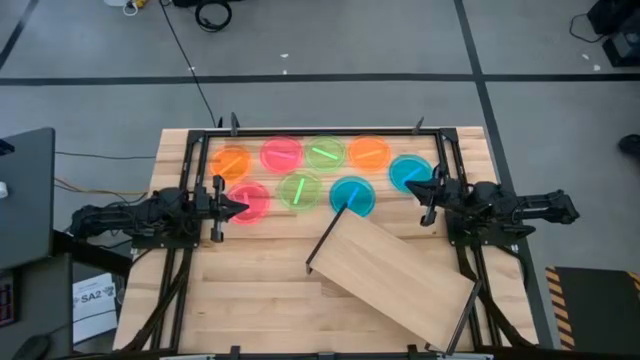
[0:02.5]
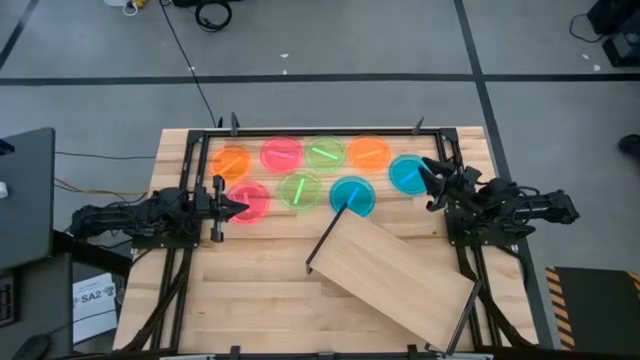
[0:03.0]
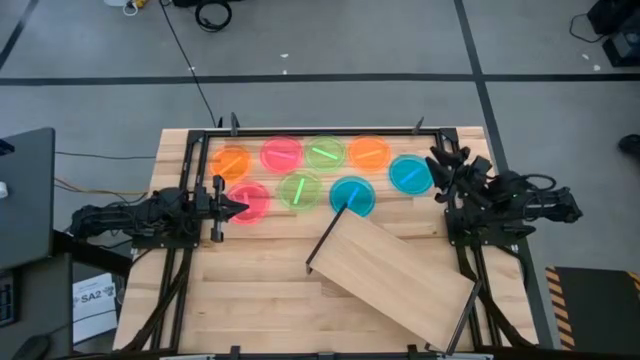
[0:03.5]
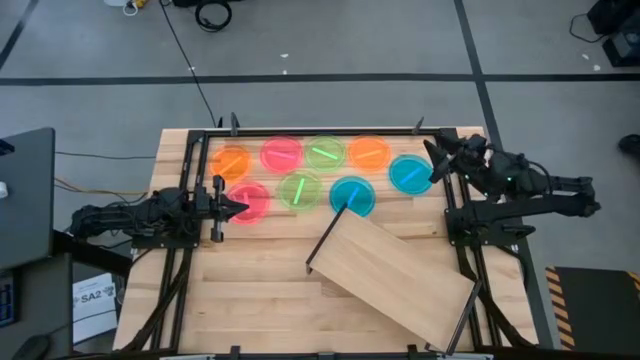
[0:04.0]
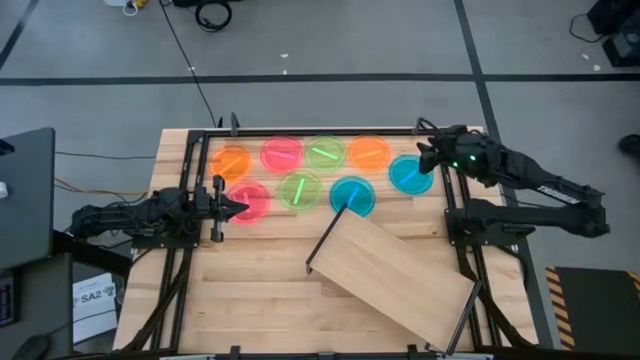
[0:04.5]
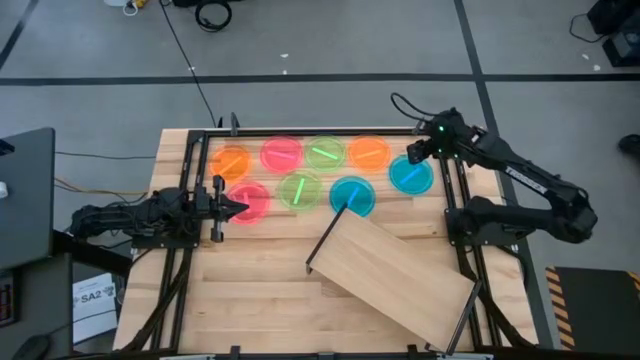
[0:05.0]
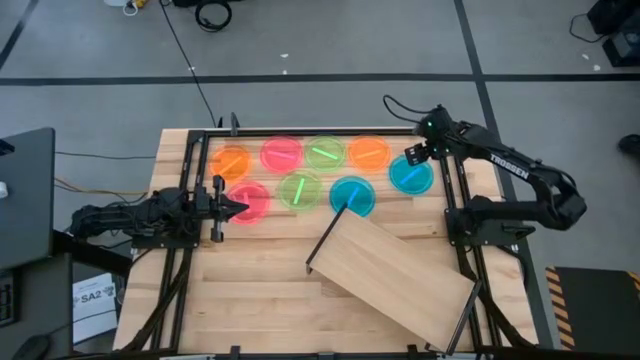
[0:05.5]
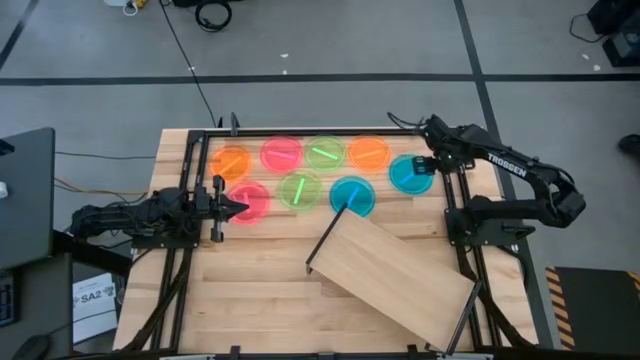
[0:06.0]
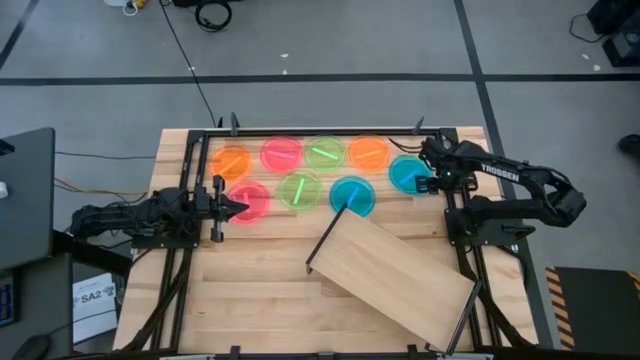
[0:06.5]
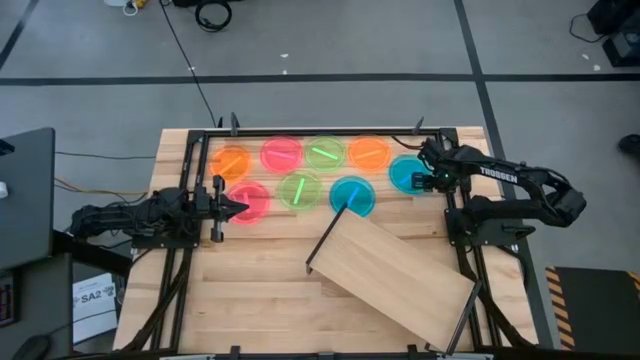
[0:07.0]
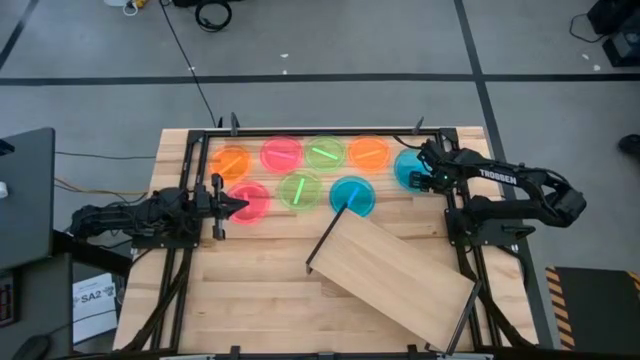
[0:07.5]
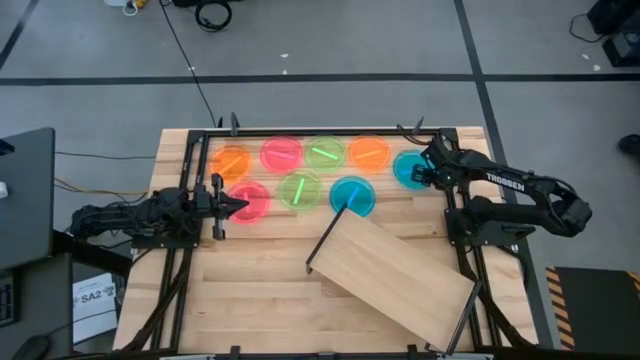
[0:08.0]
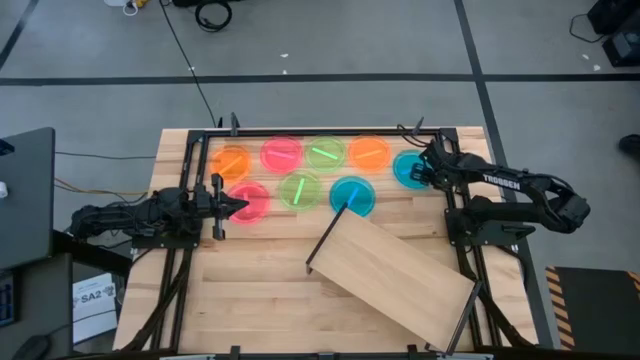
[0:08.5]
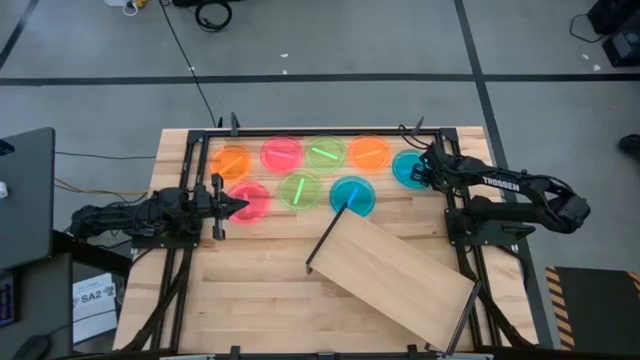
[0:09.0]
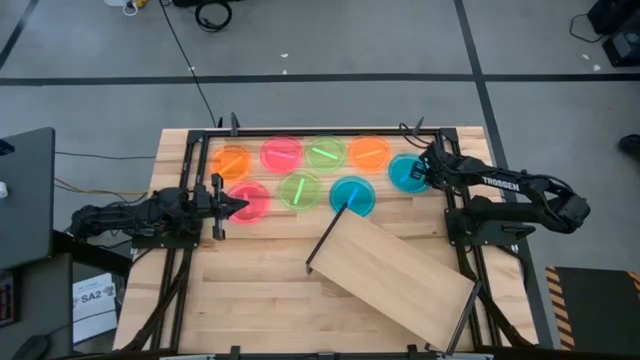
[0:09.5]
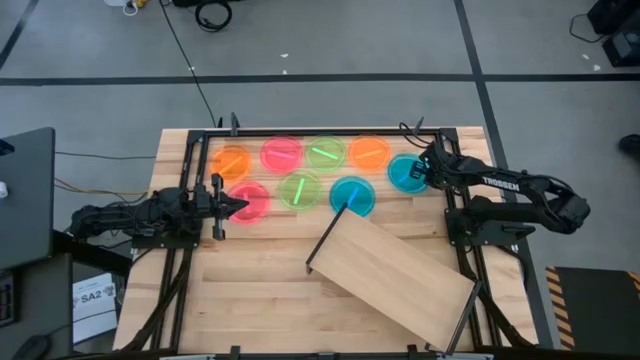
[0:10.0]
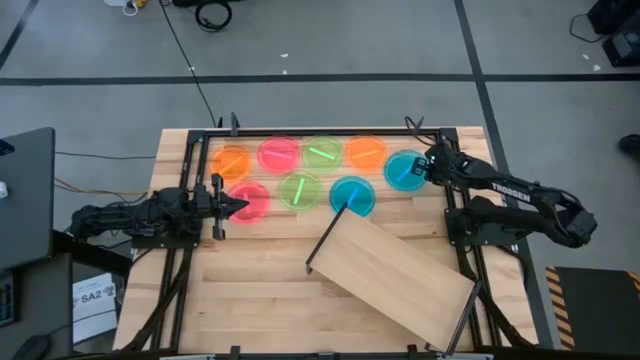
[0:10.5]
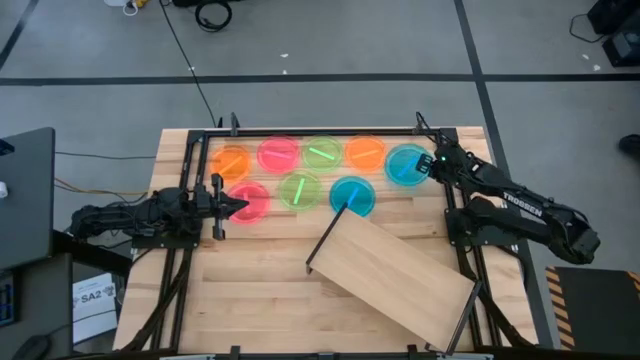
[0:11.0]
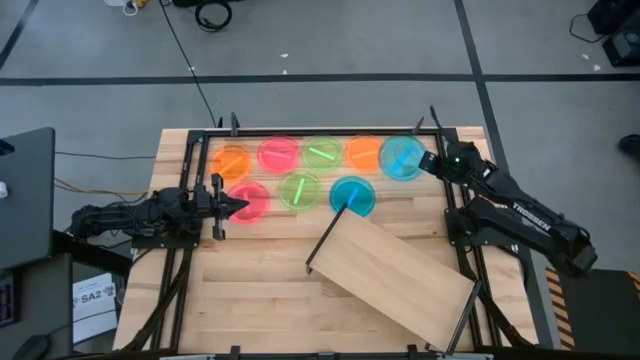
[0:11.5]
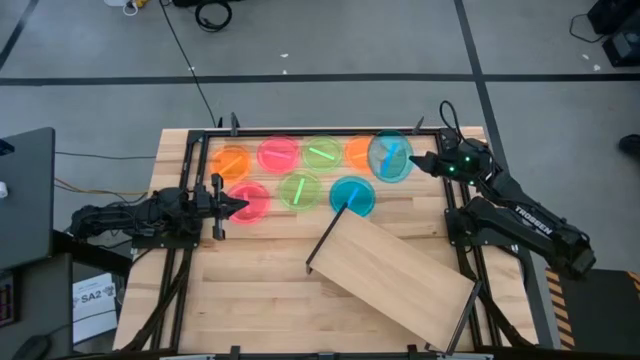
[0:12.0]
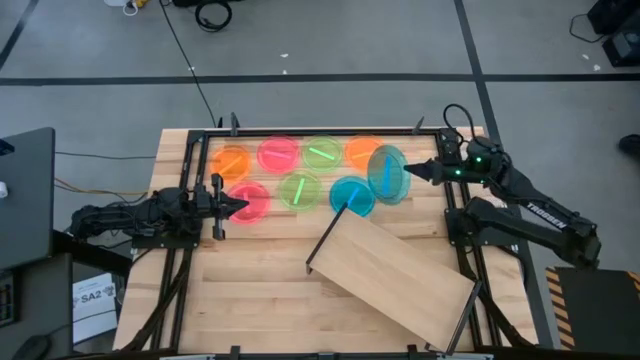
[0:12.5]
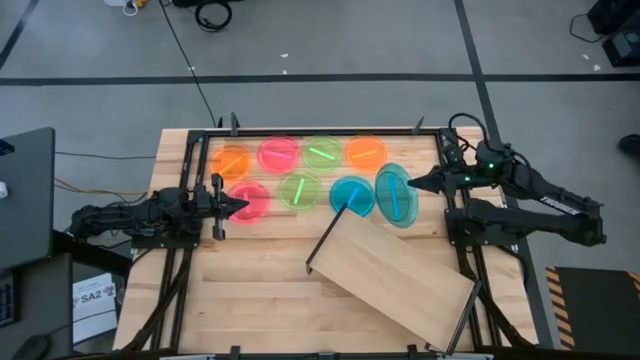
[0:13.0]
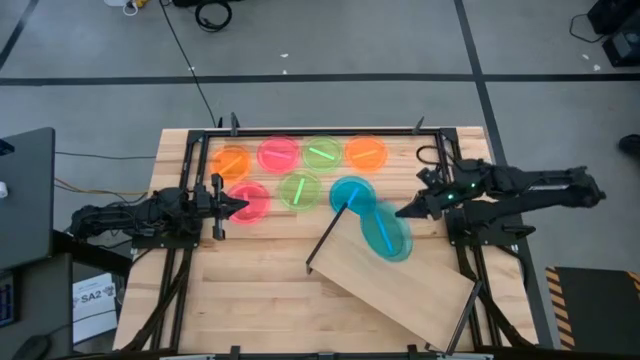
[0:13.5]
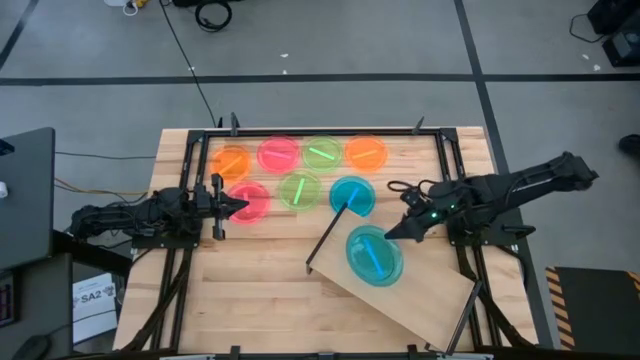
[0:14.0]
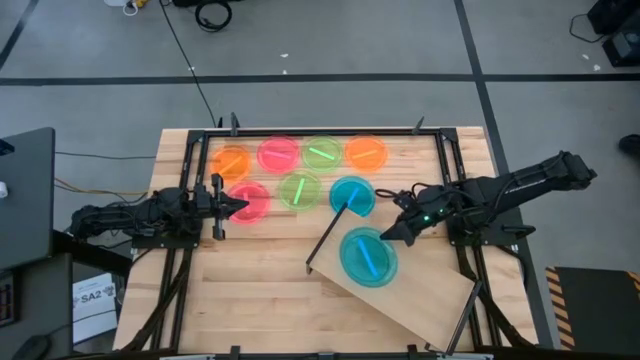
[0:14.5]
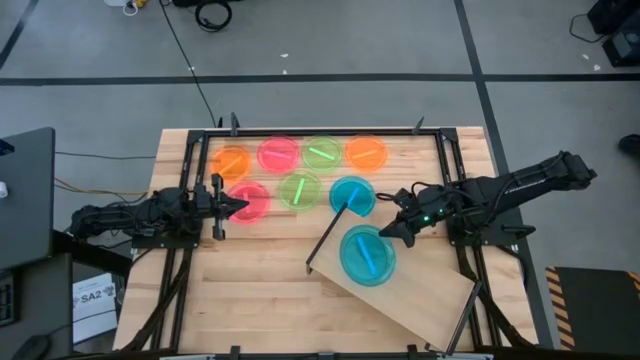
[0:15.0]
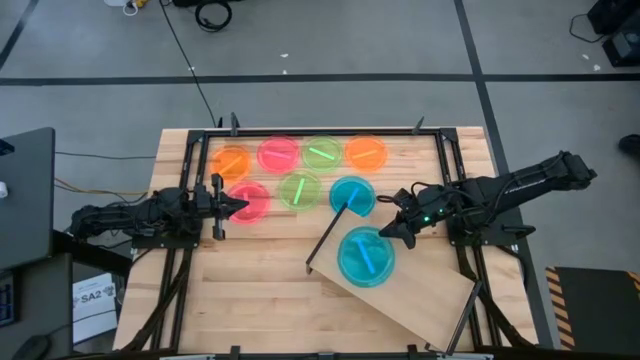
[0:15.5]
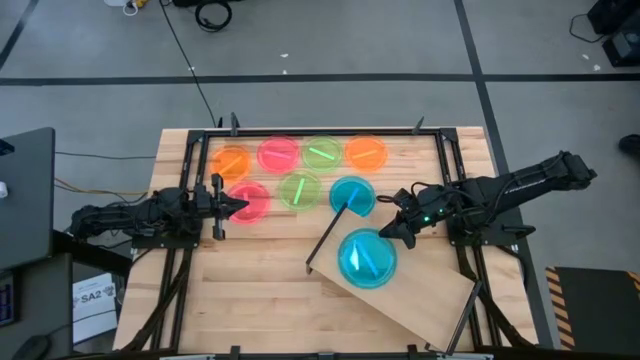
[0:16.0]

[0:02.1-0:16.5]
Task: Place and stack plates onto a shelf
Put the top right transparent blue plate on the shelf

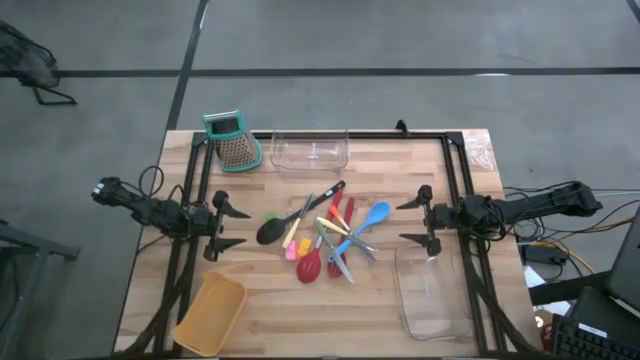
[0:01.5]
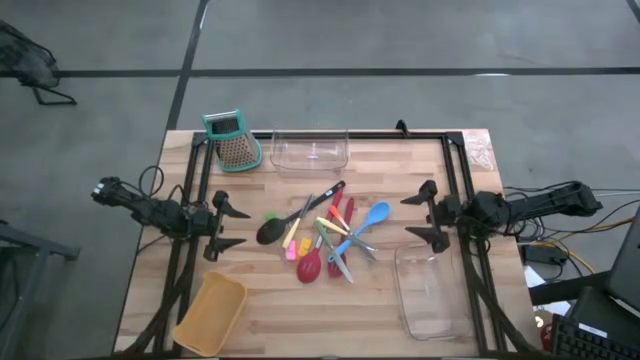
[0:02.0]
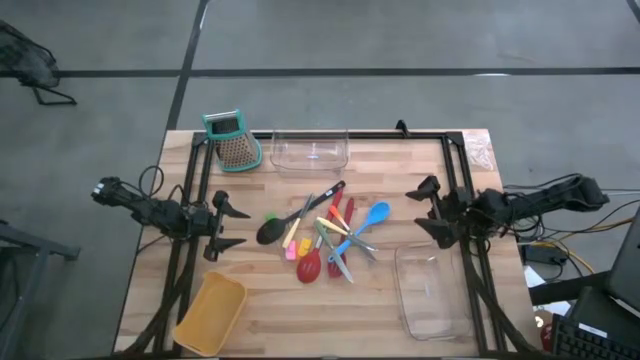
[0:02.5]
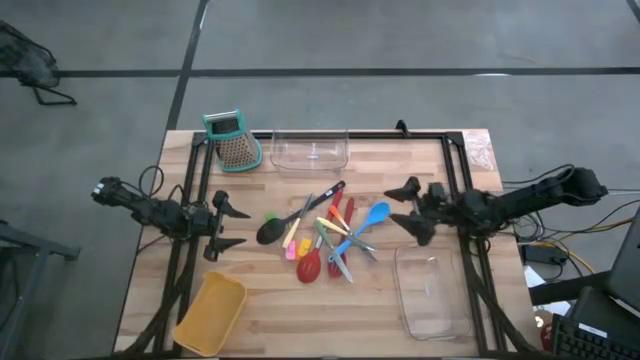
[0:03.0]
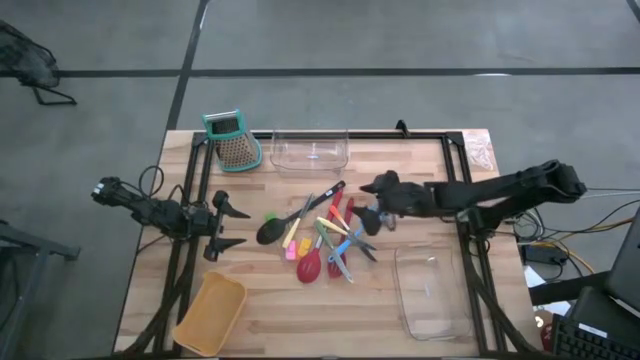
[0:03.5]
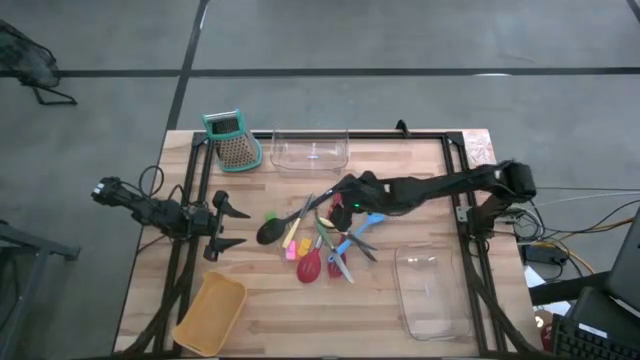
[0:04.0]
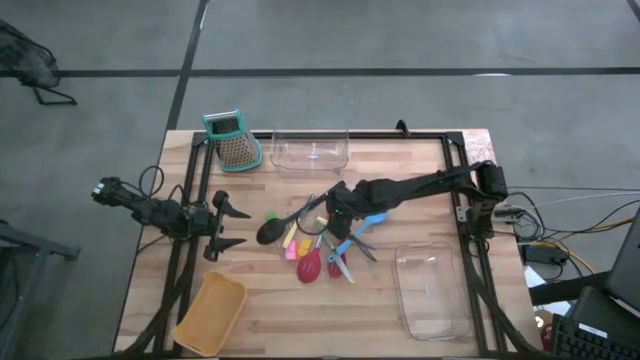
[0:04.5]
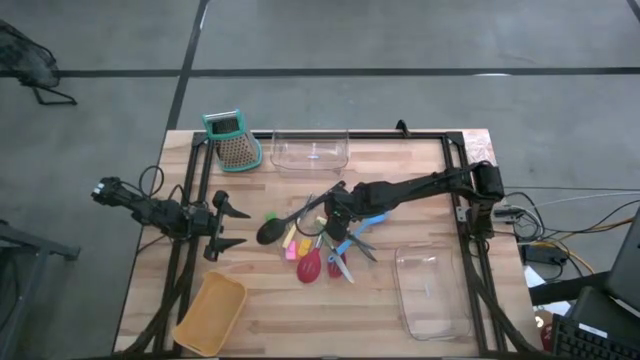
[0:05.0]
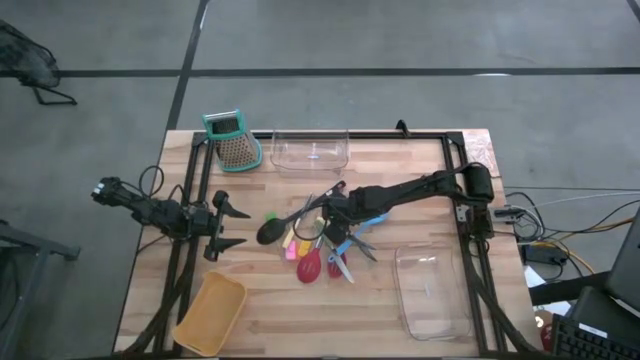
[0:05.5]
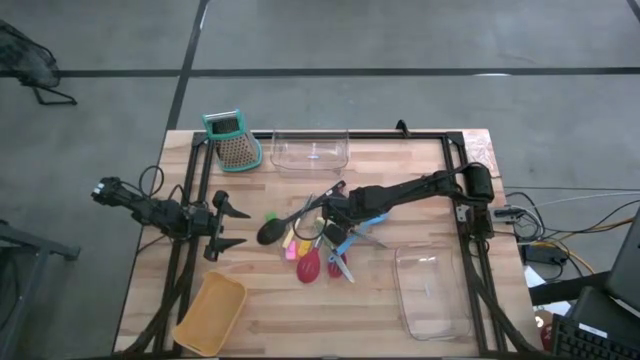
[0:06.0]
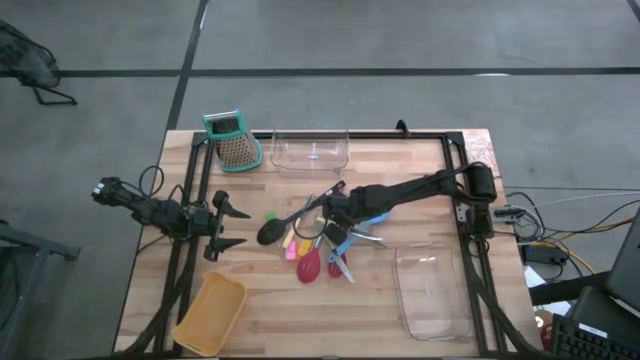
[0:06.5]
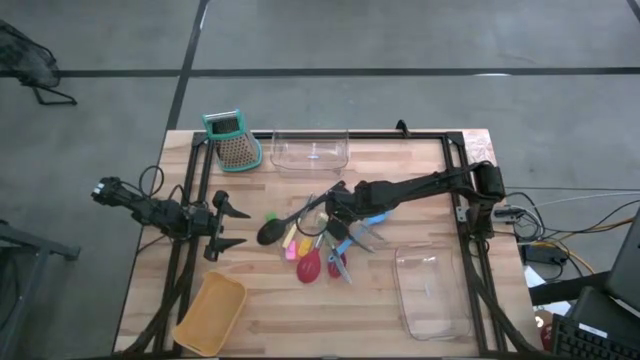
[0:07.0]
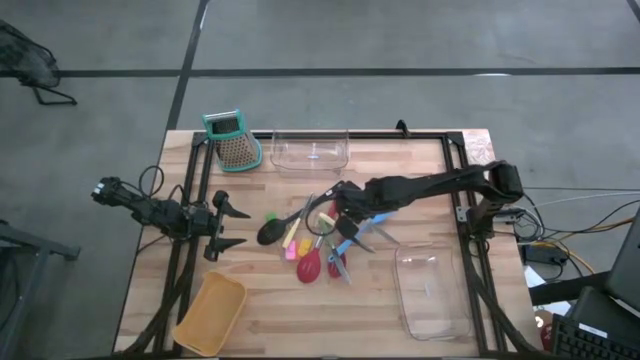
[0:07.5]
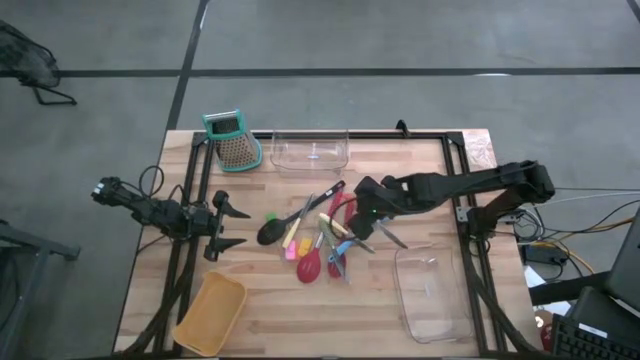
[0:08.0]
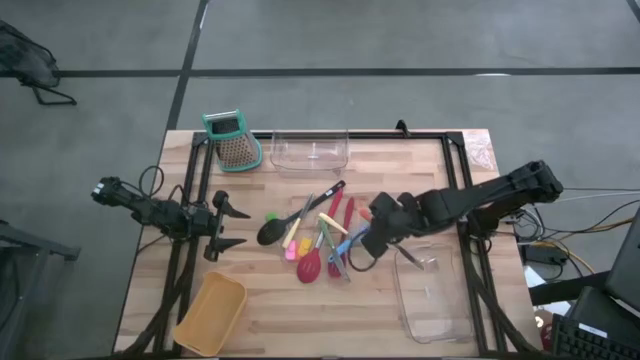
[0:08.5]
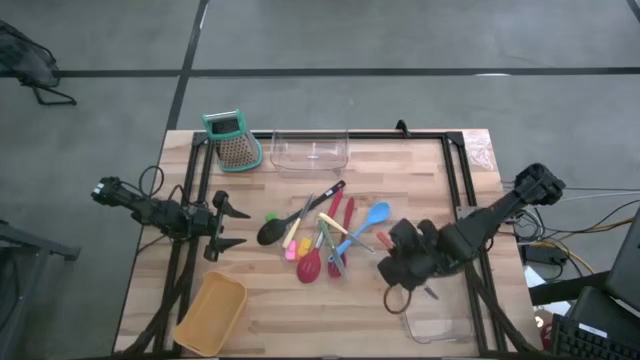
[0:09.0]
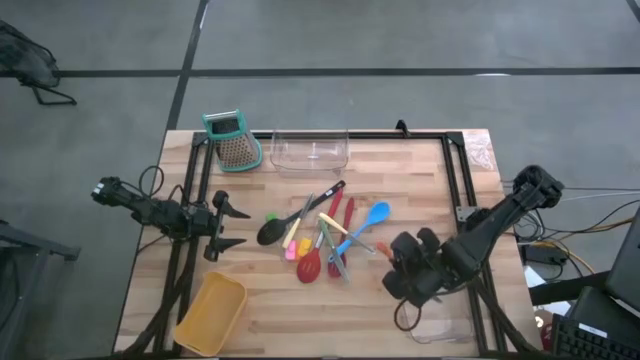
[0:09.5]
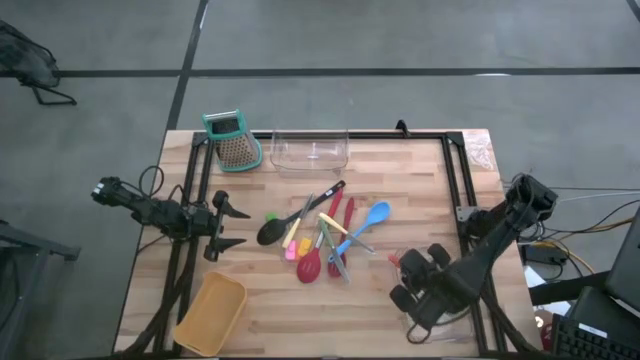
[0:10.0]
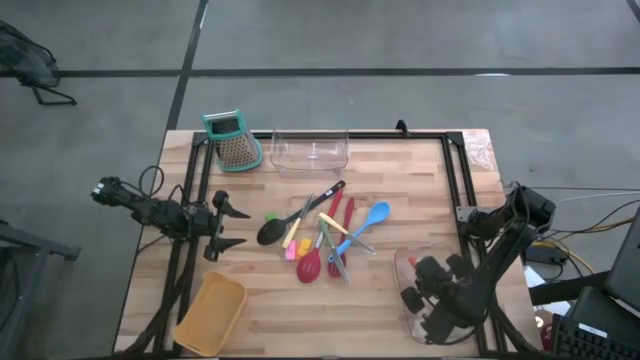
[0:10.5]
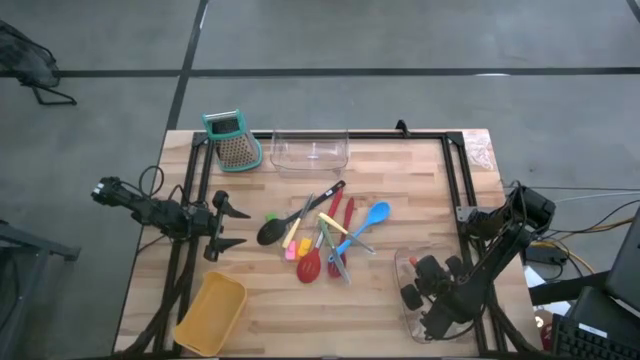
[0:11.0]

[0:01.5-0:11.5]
Task: Pick & Place Kitchen Items
Put the orange knife into the bottom transparent bin
